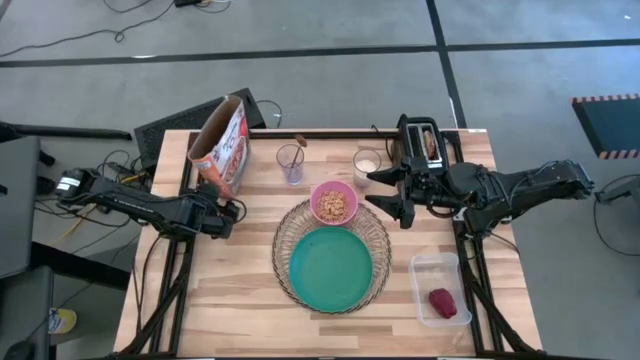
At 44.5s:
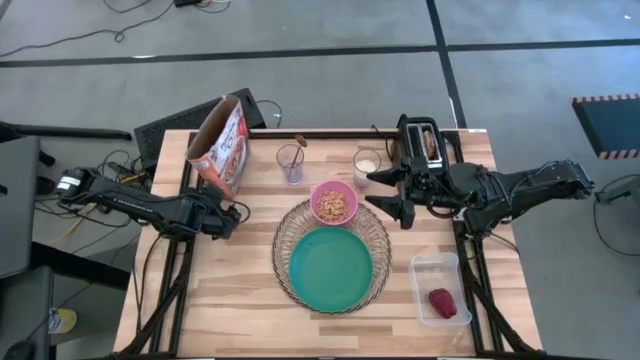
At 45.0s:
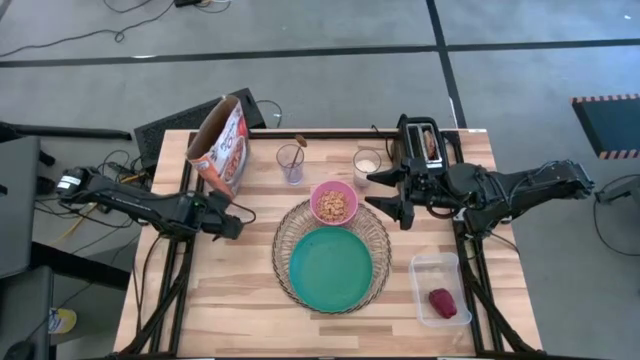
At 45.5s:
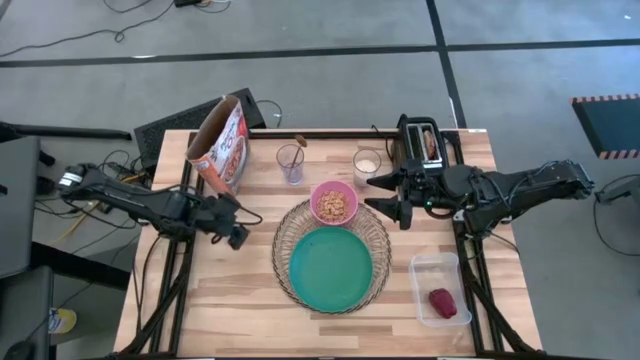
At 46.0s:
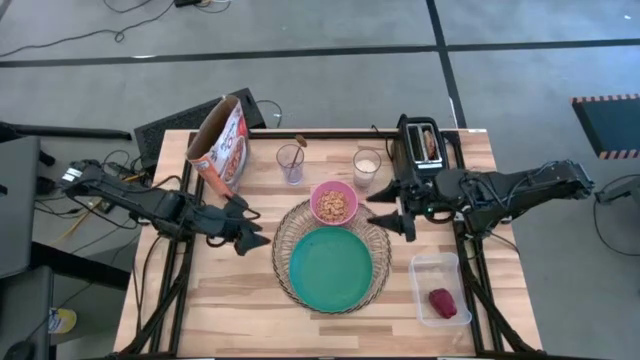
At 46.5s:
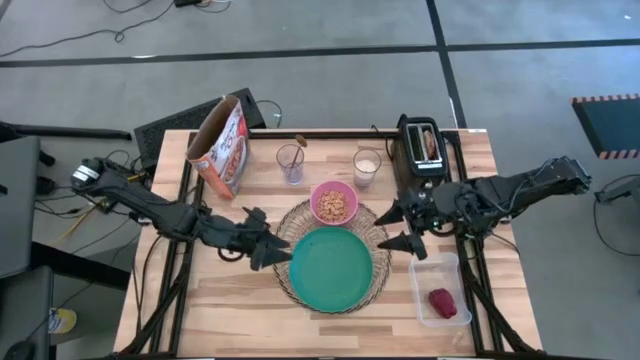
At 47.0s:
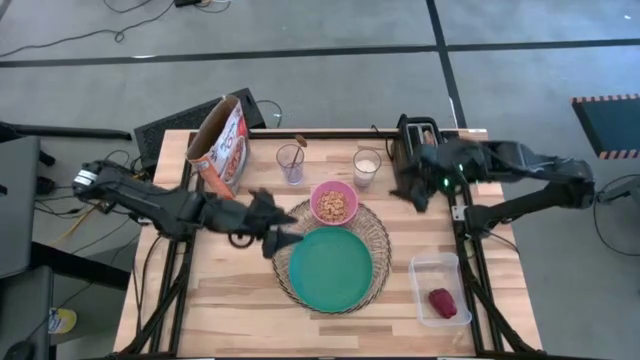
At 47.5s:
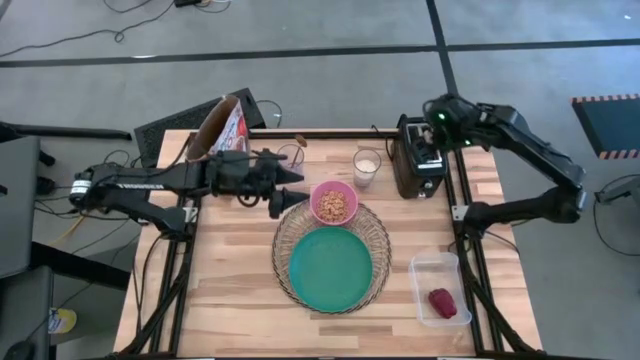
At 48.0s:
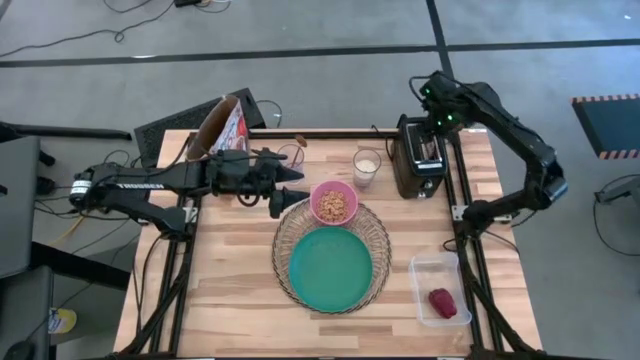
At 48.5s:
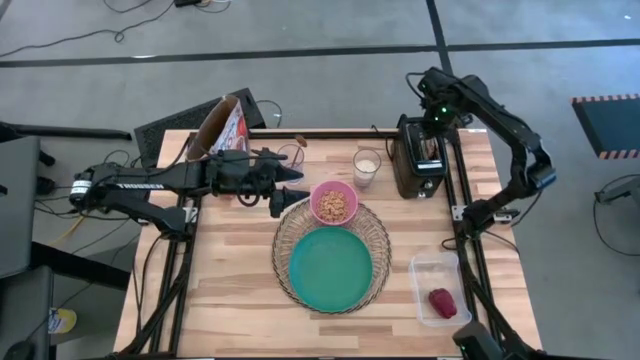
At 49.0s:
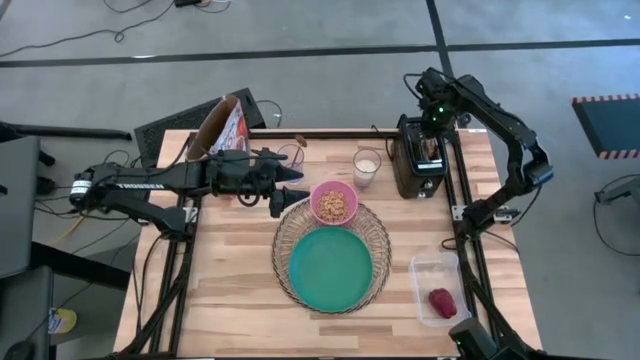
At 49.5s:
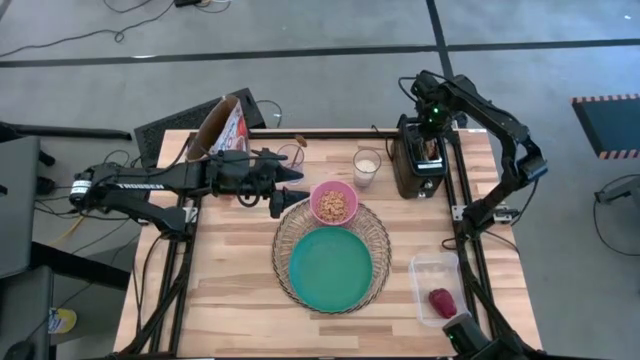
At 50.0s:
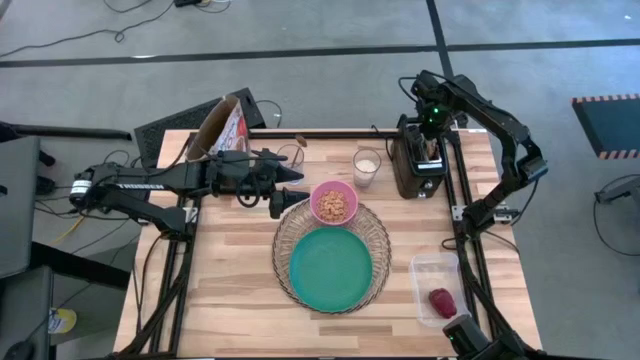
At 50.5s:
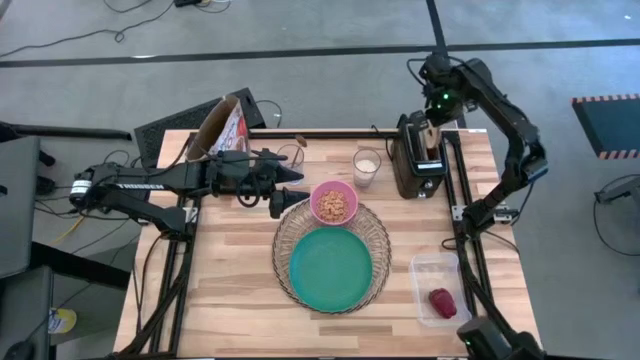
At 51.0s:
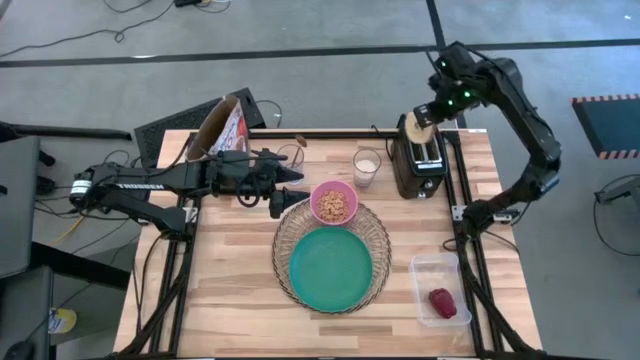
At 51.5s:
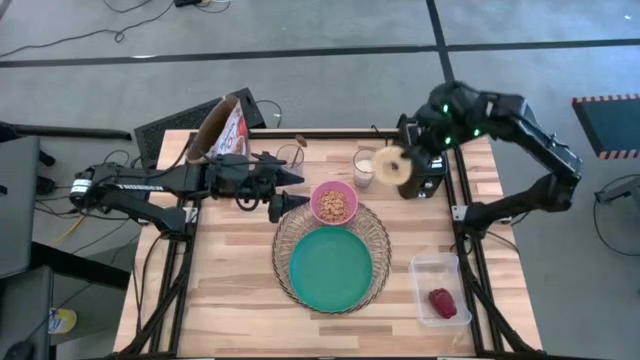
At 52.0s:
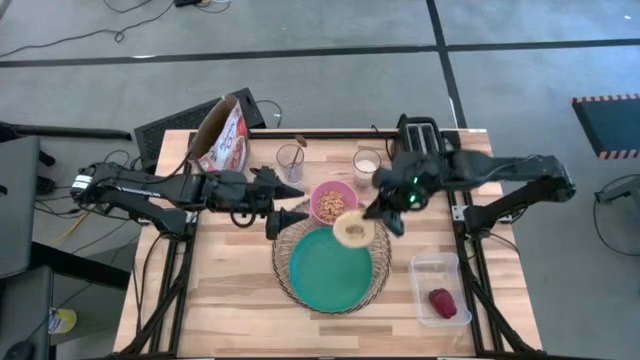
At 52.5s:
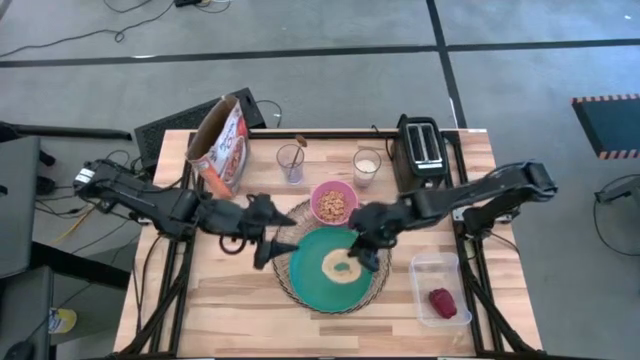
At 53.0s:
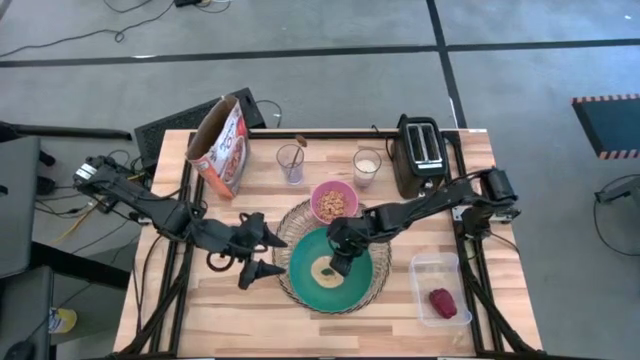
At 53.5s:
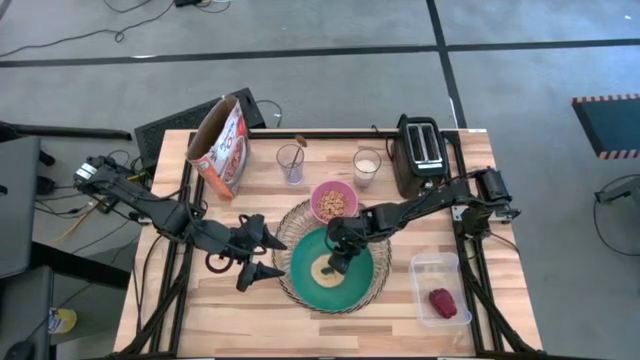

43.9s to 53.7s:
Task: Arrange a breakfast setting
Put the bread on the green plate

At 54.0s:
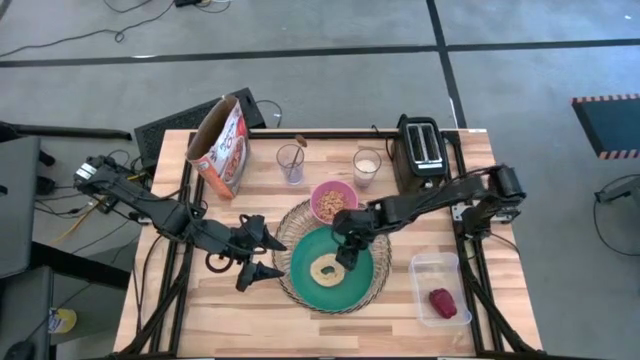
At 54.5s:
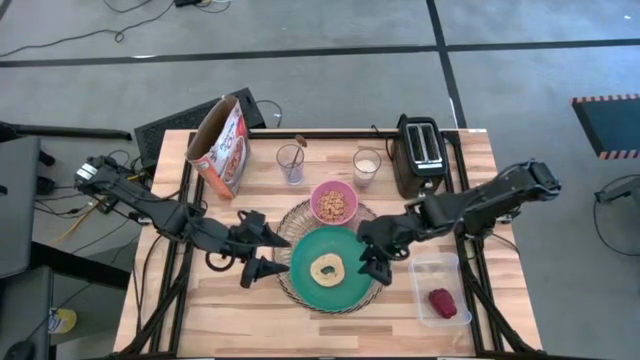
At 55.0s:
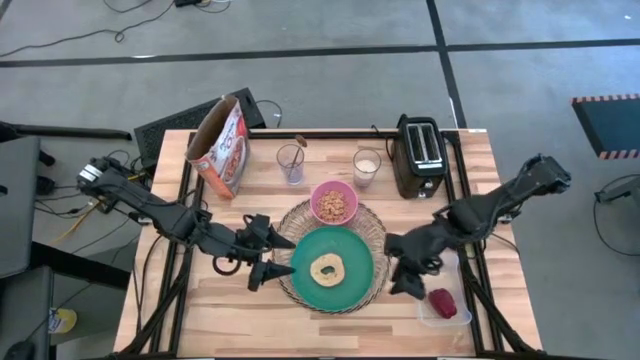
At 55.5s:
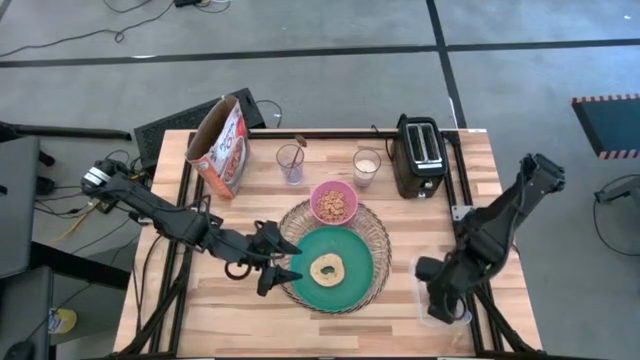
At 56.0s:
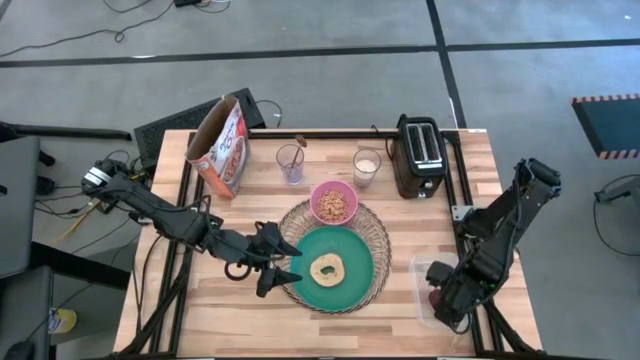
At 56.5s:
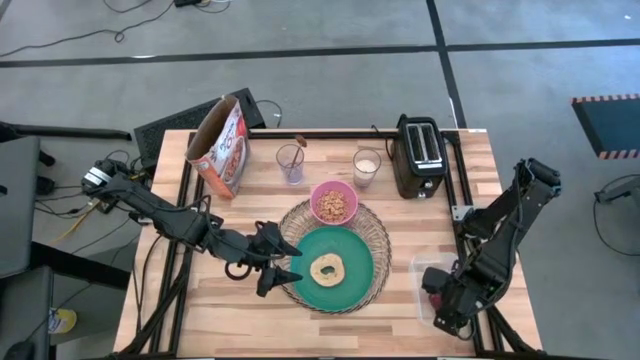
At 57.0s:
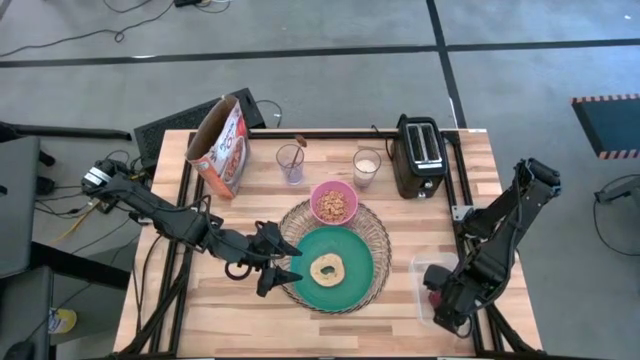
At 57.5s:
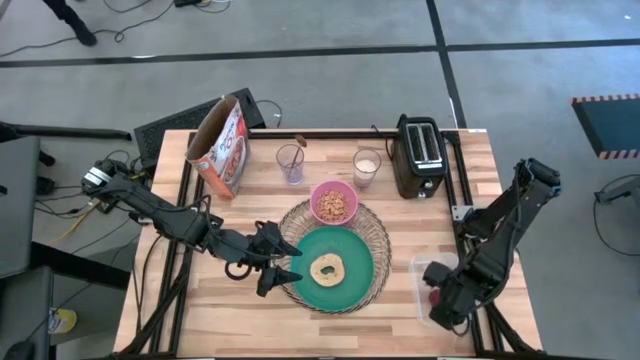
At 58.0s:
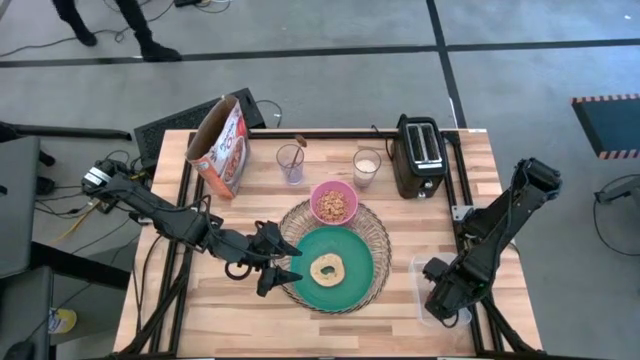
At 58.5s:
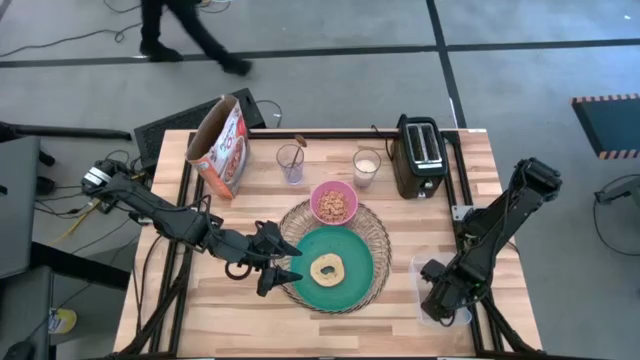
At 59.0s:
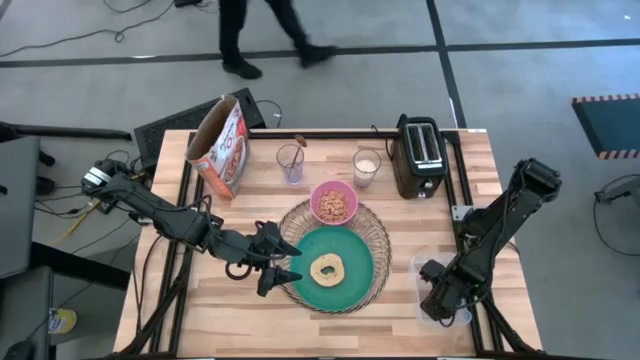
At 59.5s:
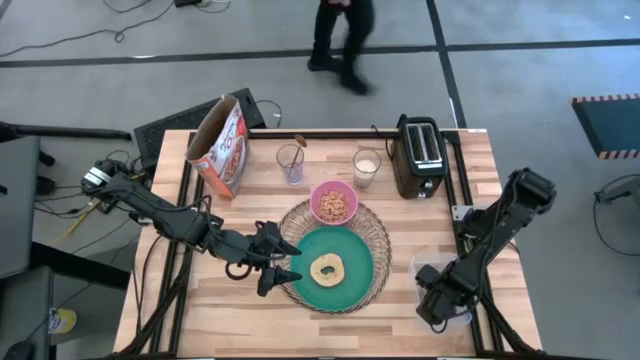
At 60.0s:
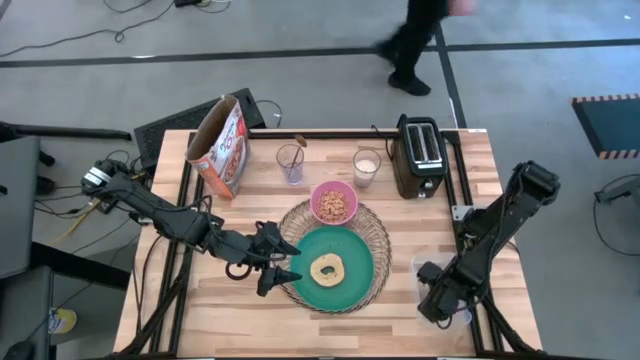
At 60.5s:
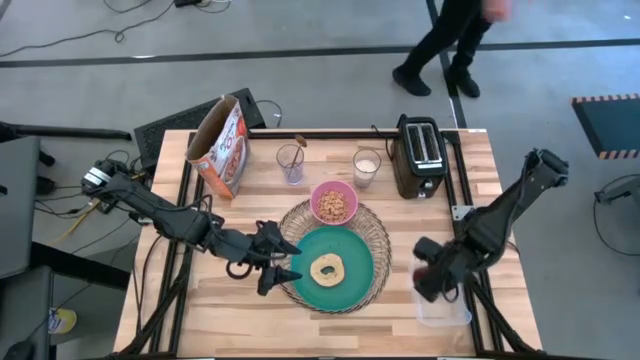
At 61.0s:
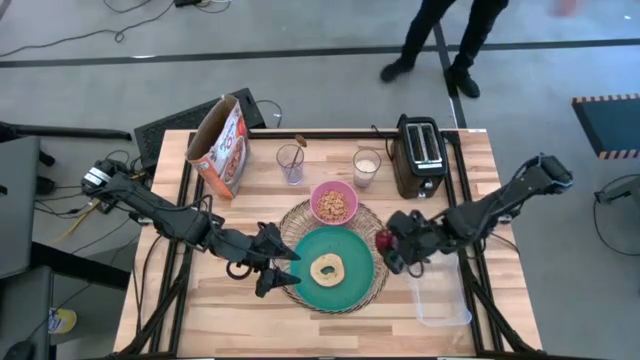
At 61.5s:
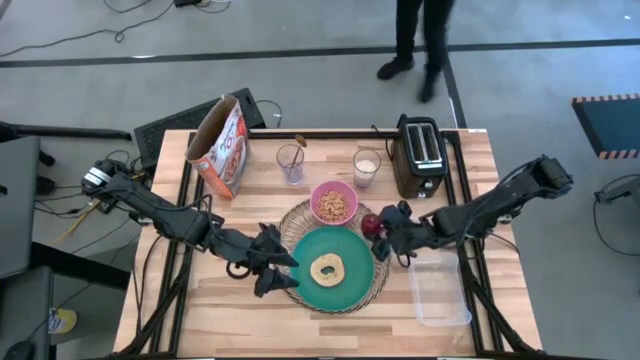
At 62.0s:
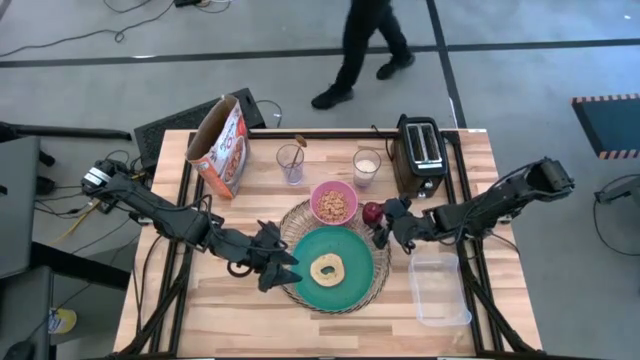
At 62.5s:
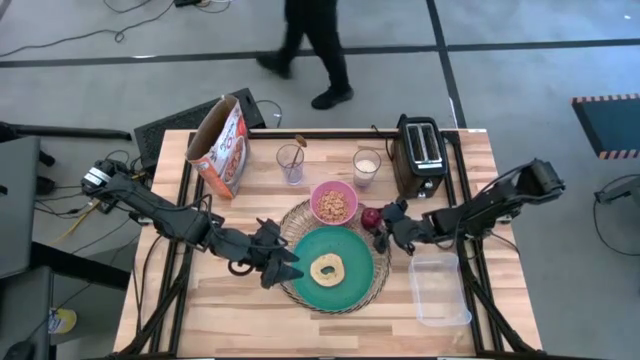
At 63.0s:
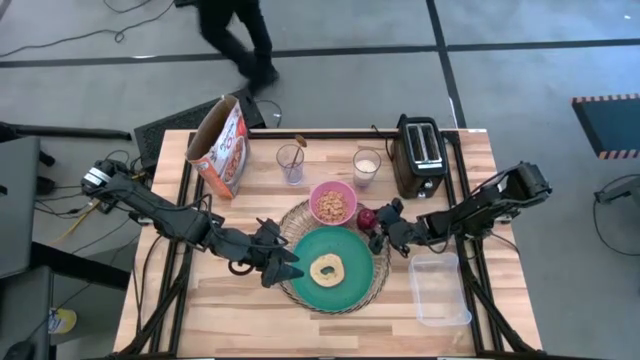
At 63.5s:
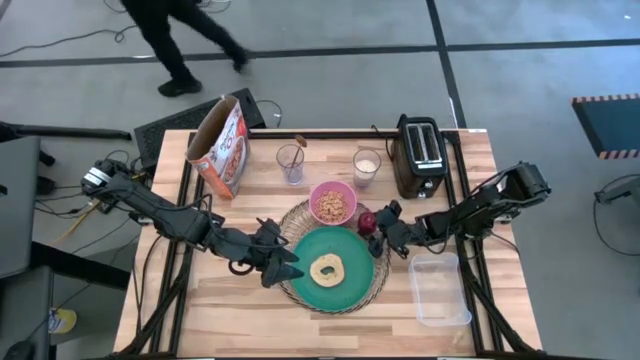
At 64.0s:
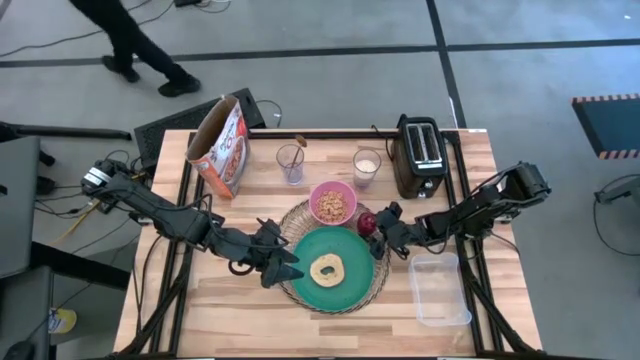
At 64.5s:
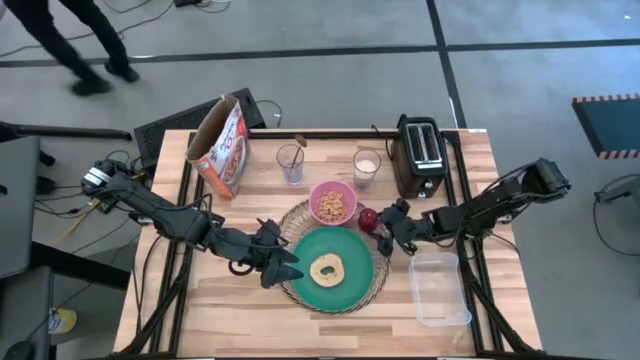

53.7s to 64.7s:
Put the red apple to the top right of the green plate
